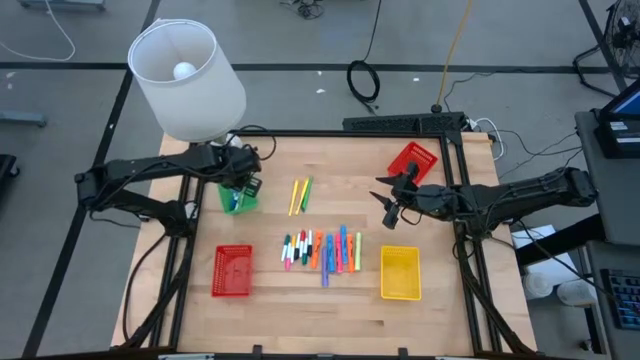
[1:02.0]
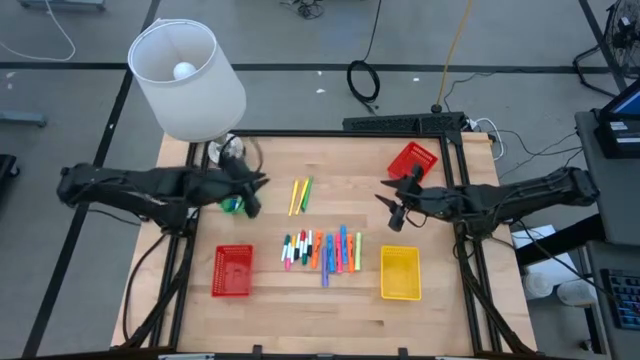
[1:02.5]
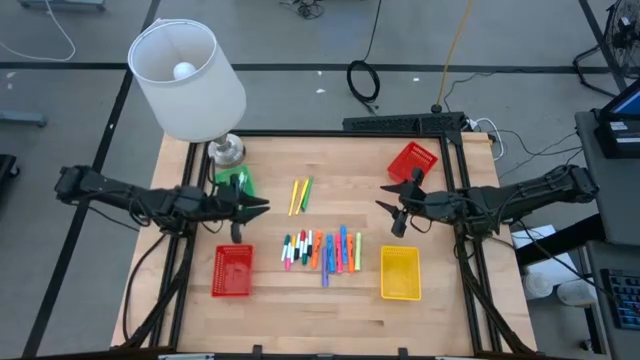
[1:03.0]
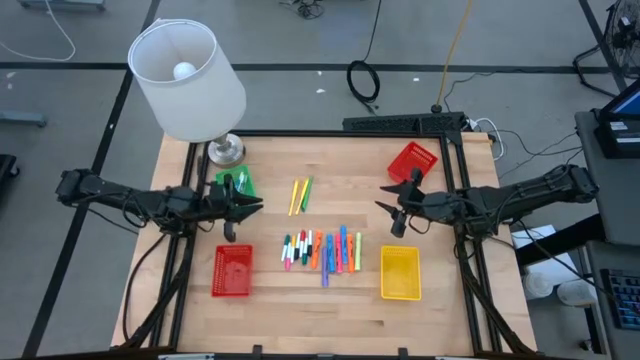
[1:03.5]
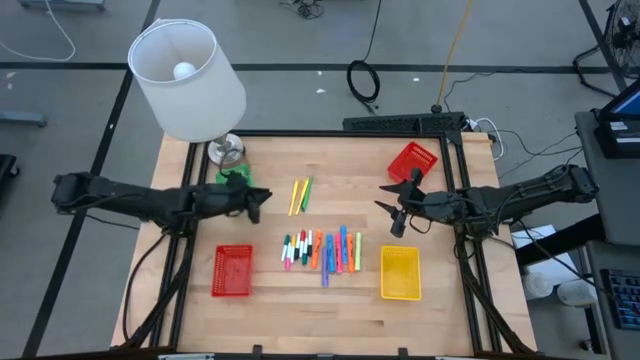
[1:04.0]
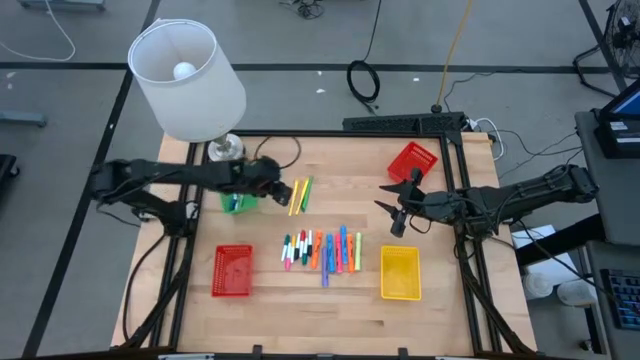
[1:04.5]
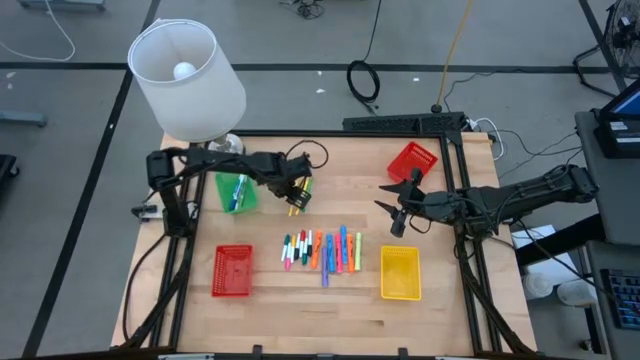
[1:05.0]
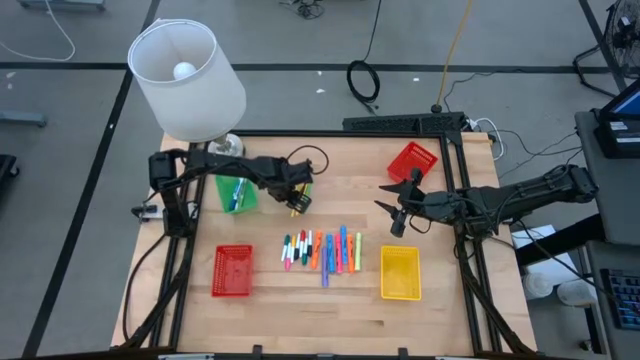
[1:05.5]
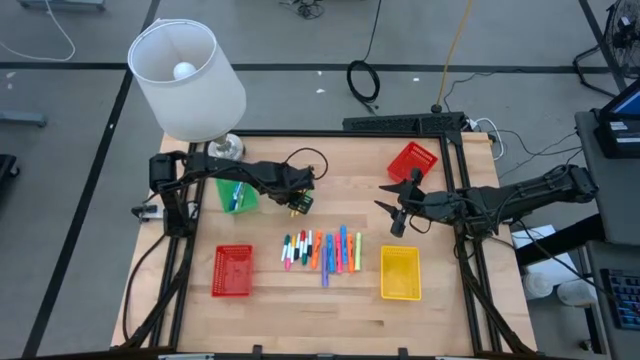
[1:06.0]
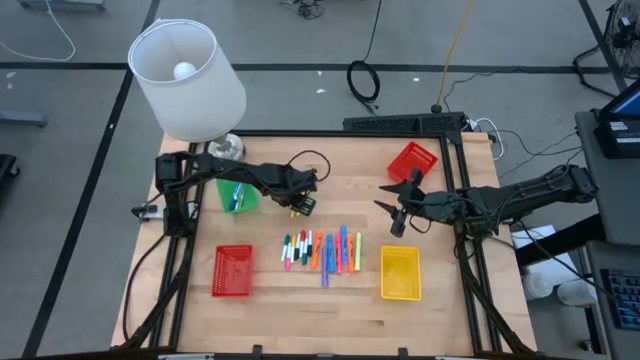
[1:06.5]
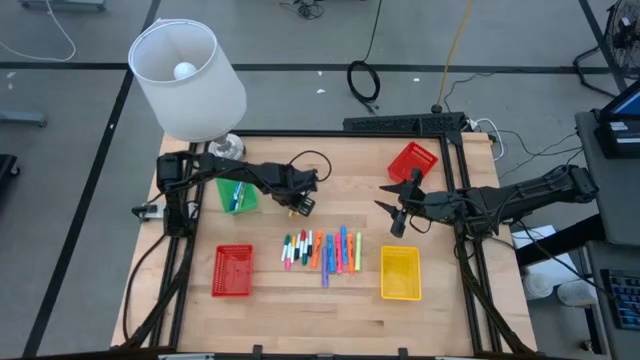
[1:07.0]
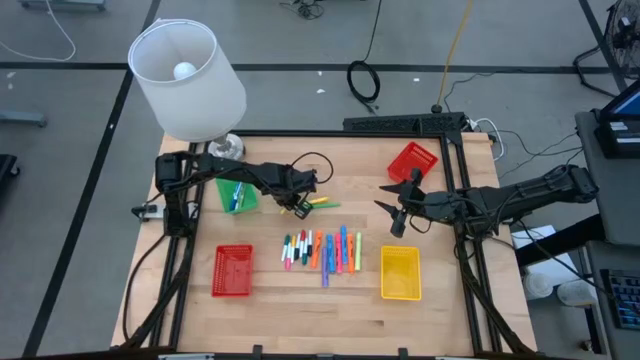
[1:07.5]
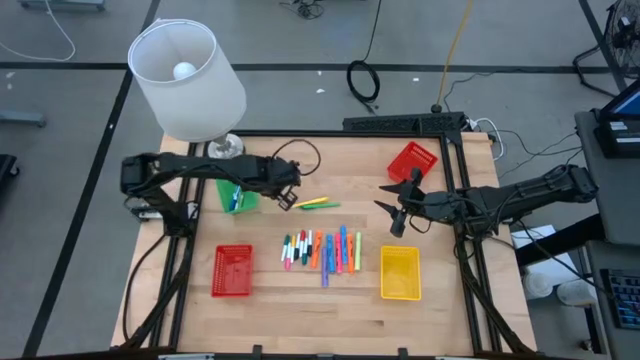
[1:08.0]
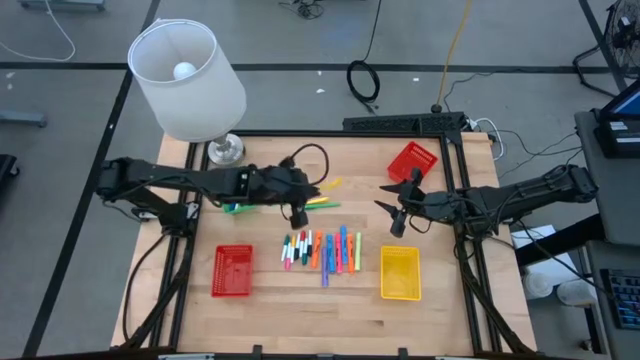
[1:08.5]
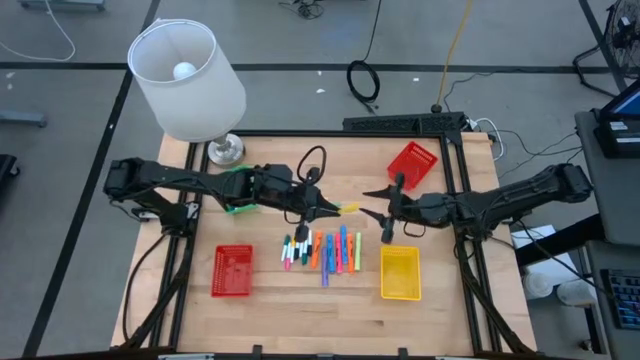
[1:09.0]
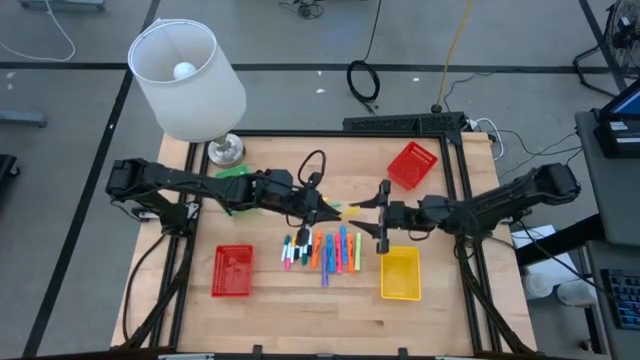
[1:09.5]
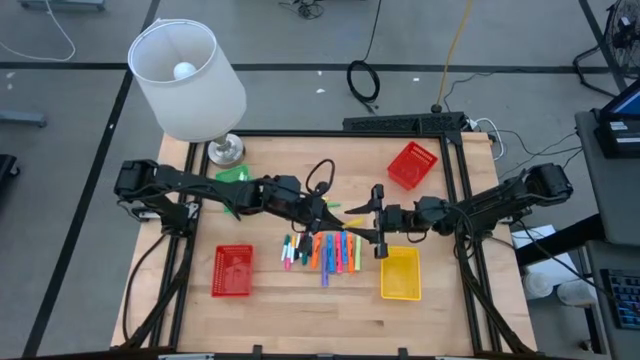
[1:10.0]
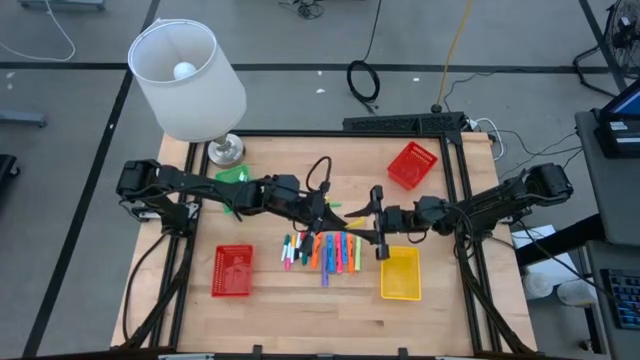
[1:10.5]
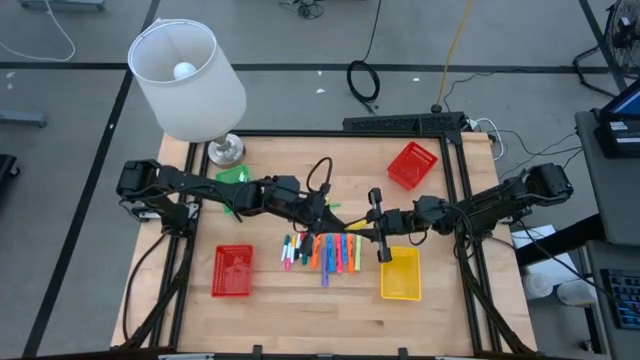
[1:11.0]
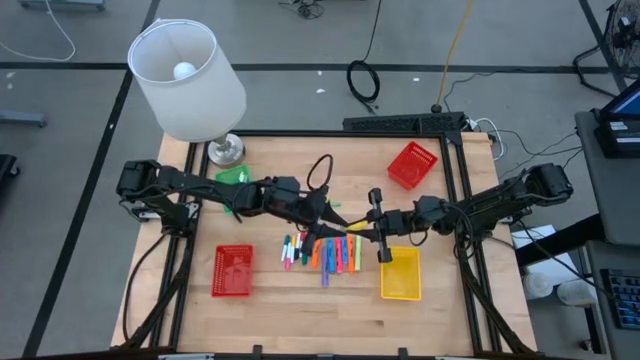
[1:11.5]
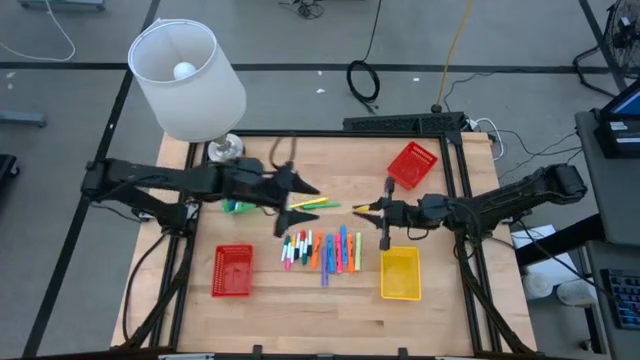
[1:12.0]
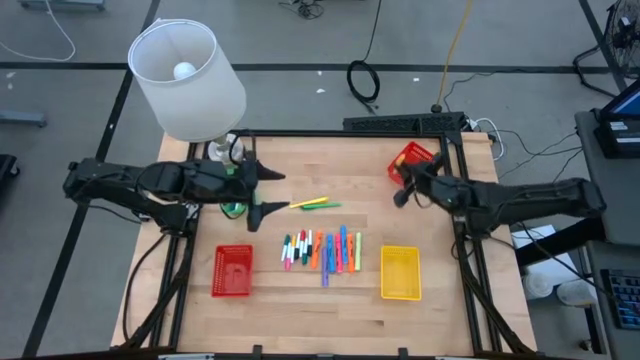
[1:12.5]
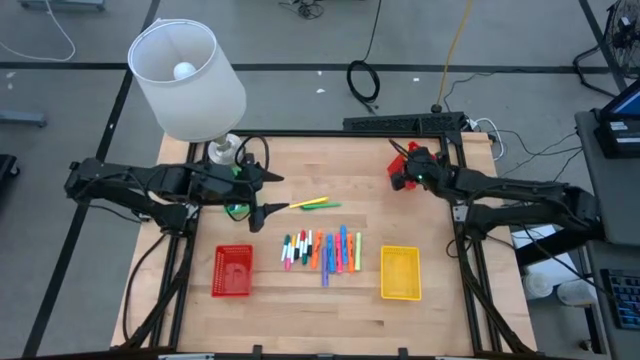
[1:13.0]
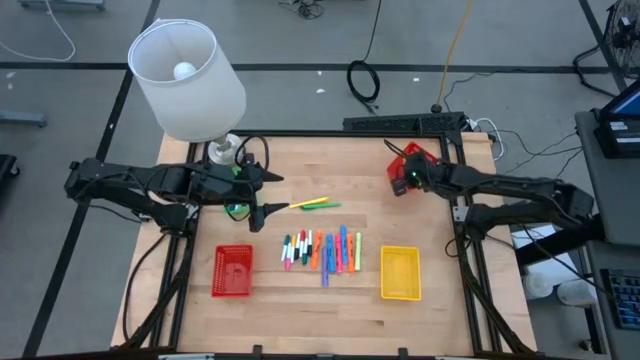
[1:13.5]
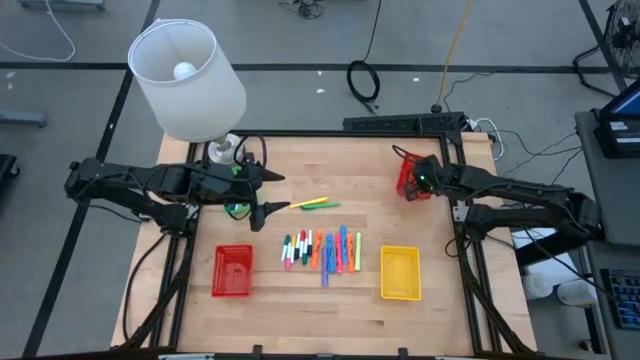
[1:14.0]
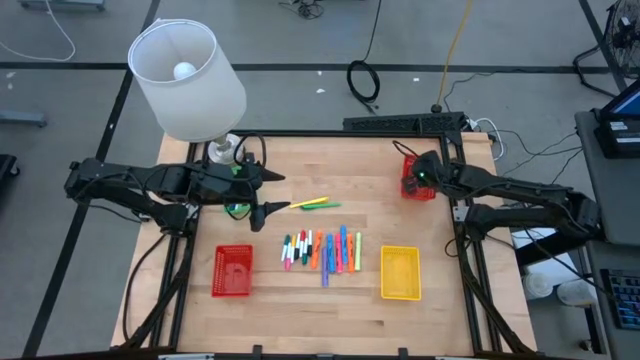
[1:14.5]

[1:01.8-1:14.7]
Task: Pick & Place Markers
Put the yellow pen into the top red basket

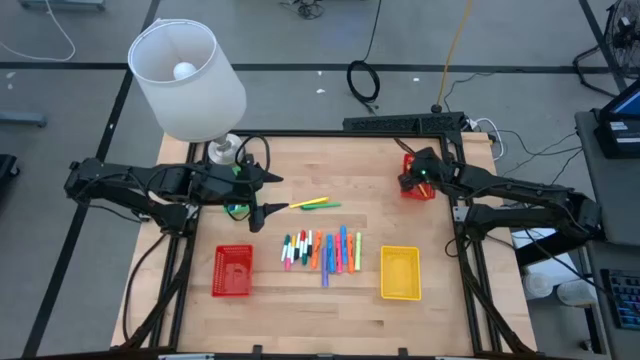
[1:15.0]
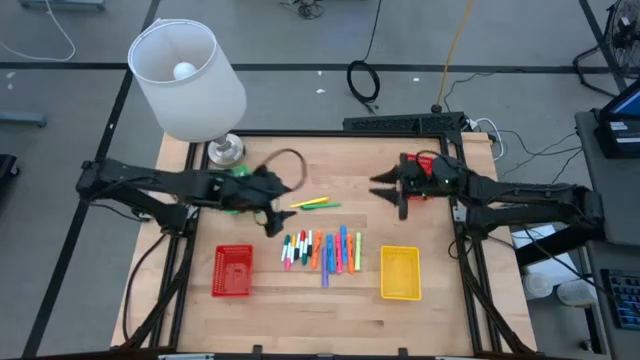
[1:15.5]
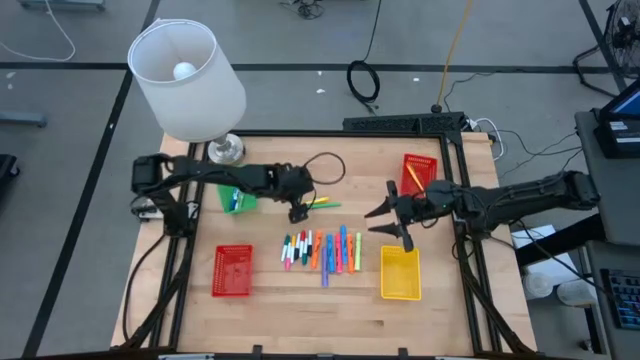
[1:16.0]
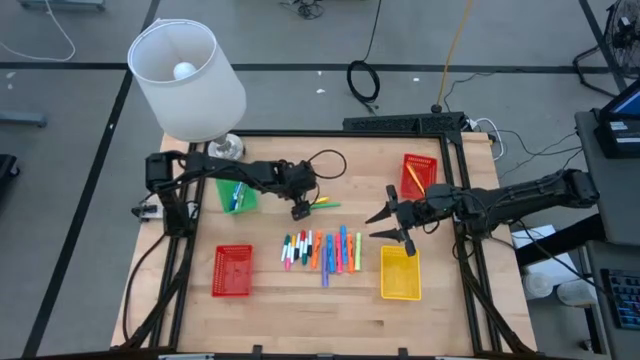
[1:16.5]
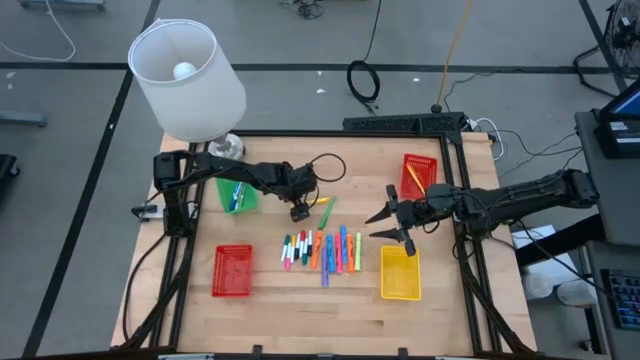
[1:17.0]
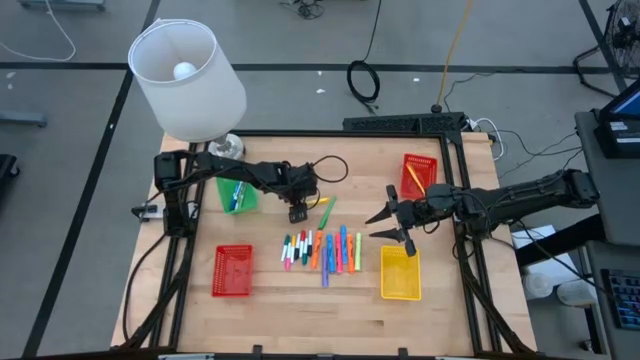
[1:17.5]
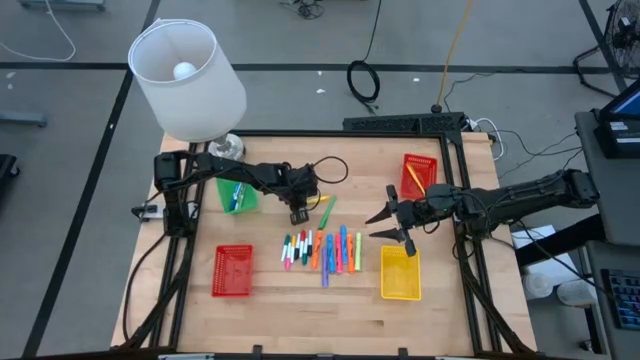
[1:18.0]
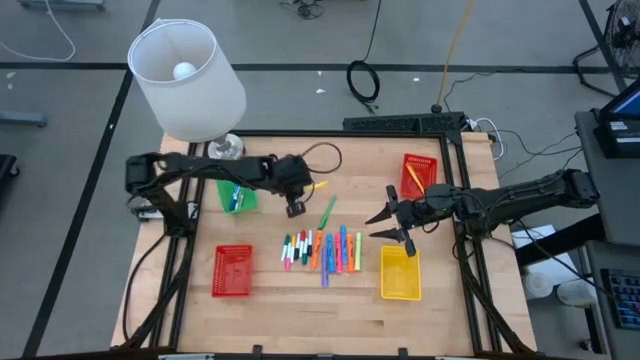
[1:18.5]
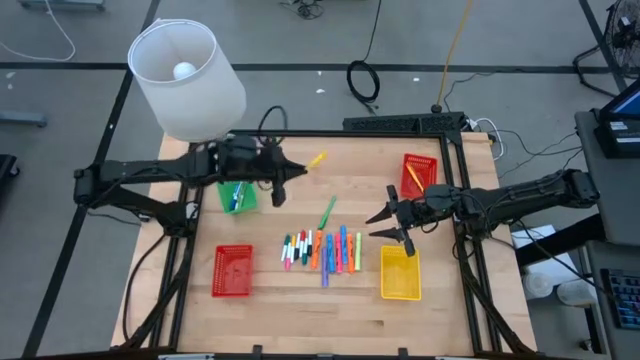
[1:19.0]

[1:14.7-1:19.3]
Put the yellow pen into the top red basket

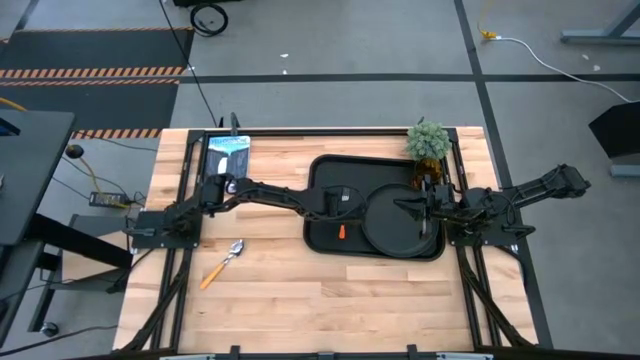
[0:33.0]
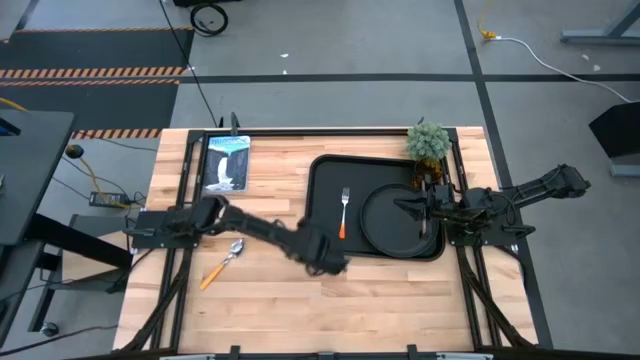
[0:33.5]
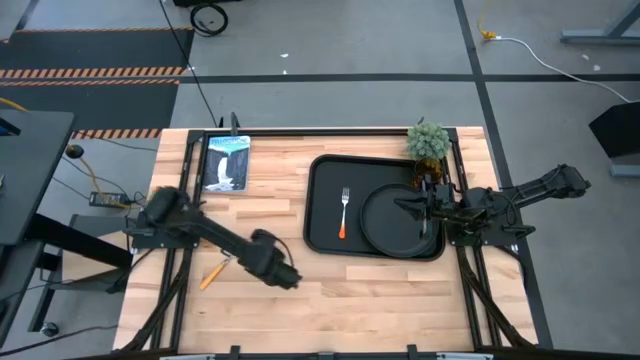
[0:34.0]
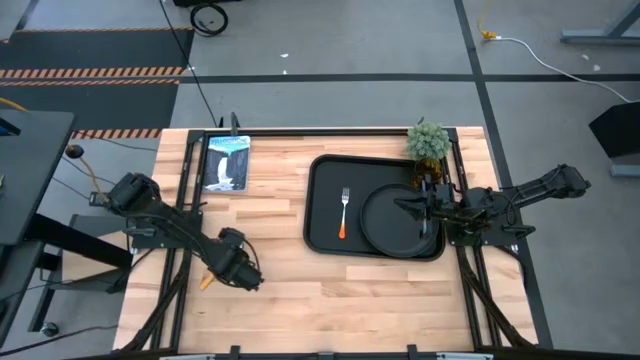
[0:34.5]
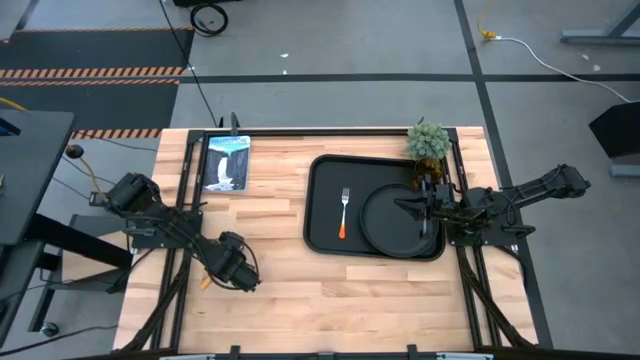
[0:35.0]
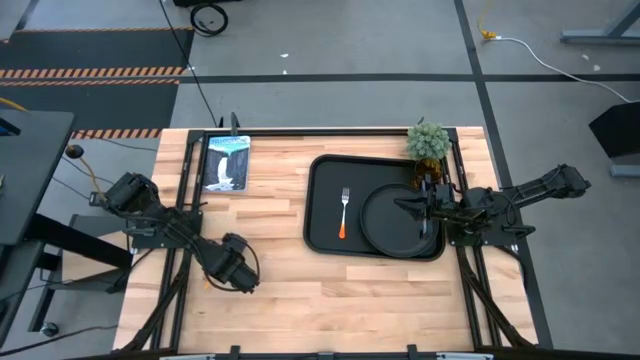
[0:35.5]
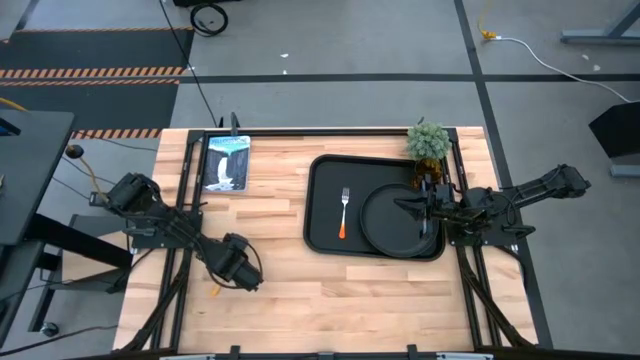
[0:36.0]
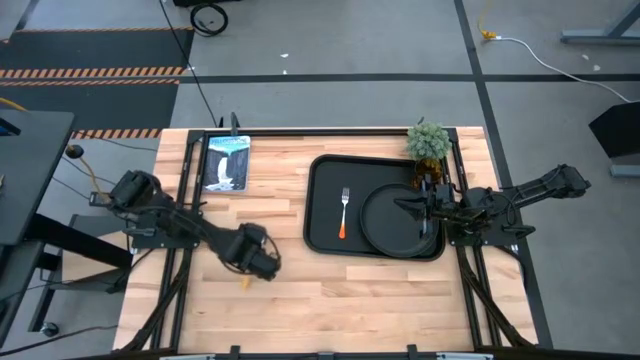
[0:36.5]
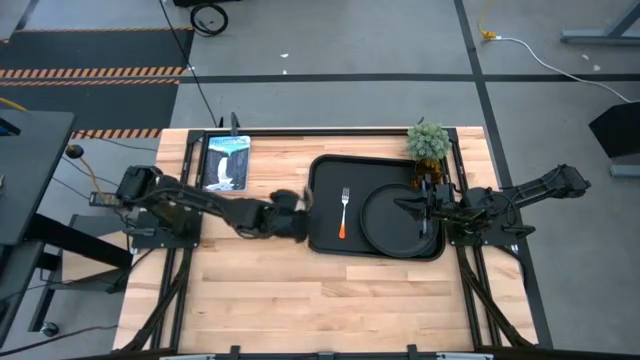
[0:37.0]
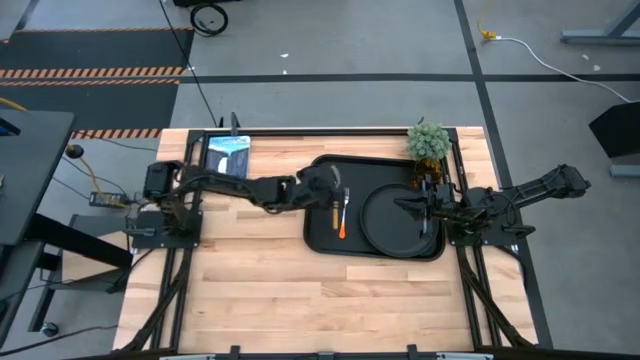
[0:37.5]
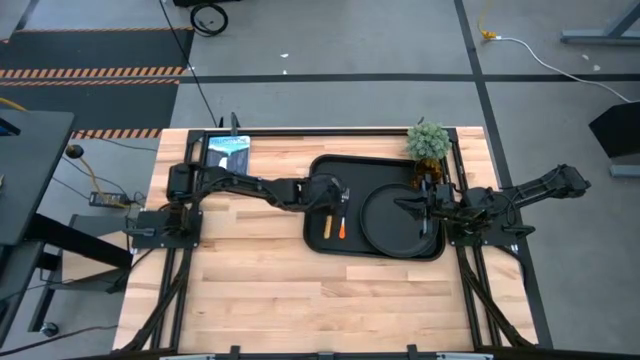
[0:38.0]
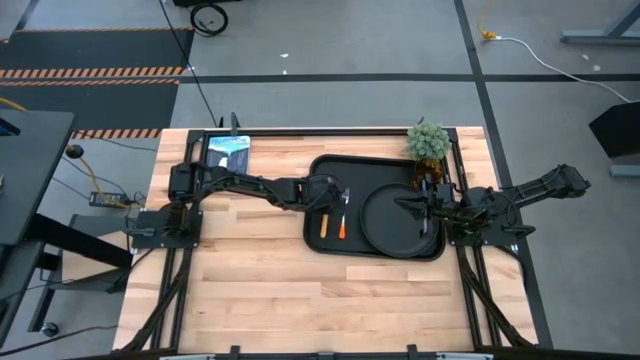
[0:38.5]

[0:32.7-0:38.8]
Task: Pick and place plate/cup/fork/spoon on tray
Put the yellow spoon on the black serving tray to the left of the orange fork
